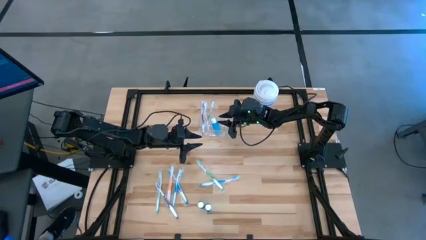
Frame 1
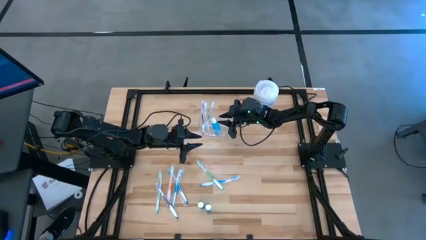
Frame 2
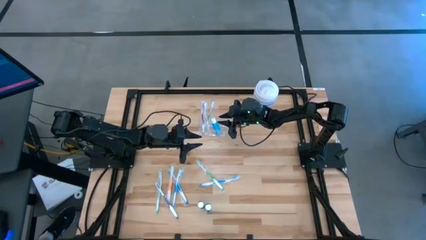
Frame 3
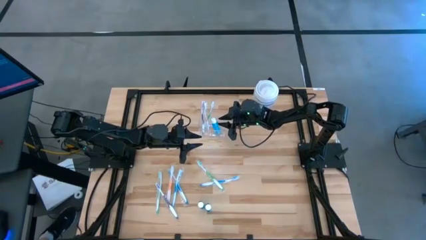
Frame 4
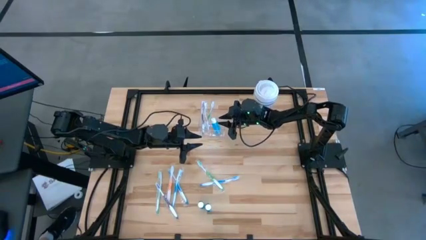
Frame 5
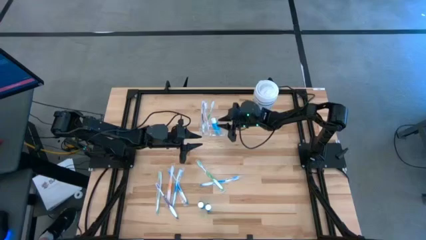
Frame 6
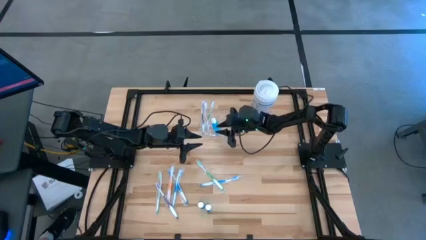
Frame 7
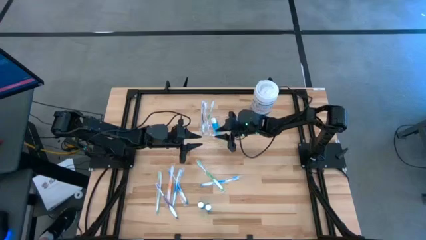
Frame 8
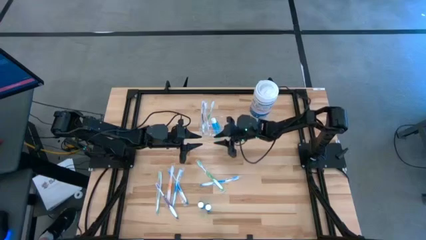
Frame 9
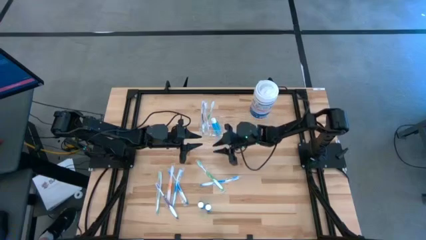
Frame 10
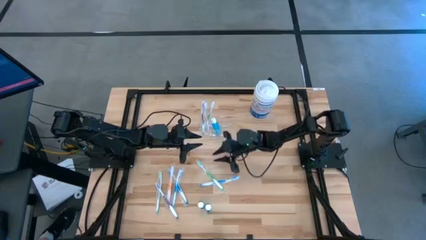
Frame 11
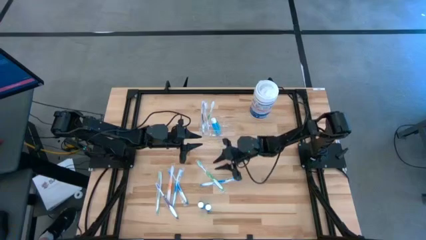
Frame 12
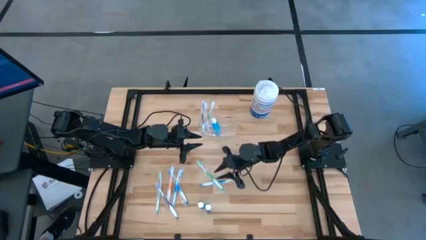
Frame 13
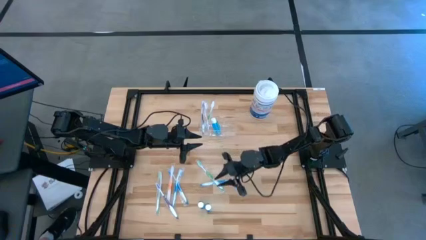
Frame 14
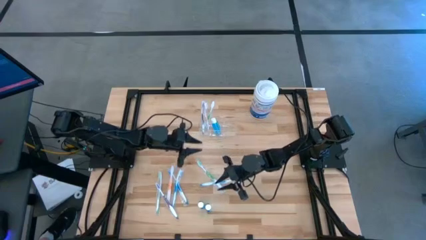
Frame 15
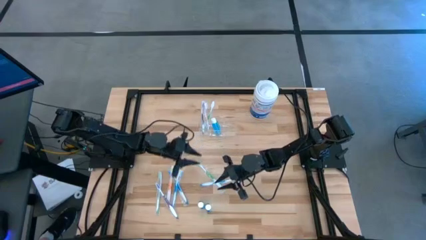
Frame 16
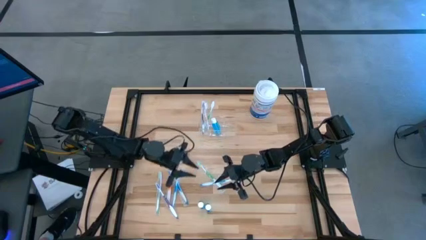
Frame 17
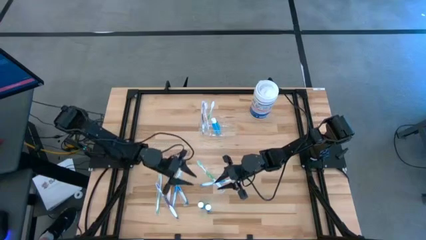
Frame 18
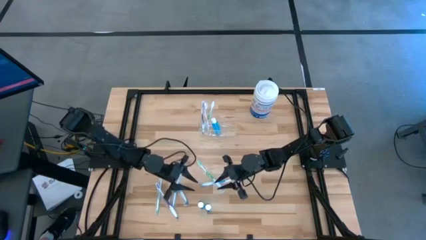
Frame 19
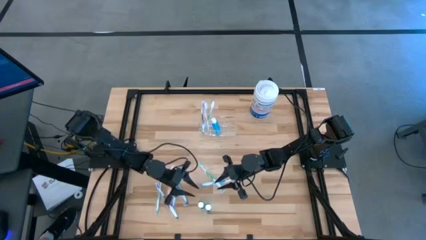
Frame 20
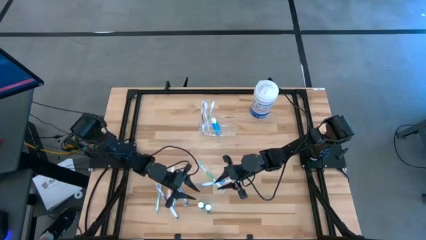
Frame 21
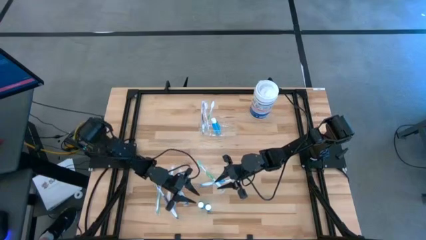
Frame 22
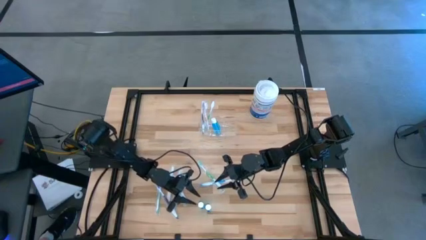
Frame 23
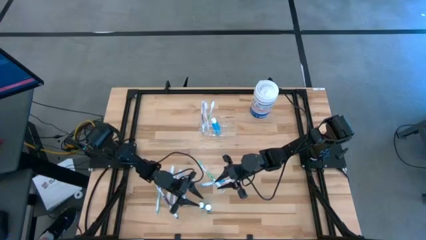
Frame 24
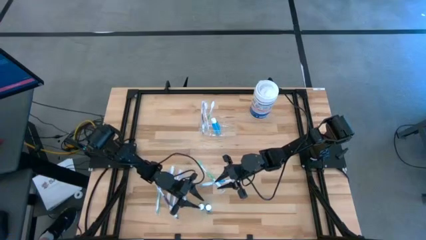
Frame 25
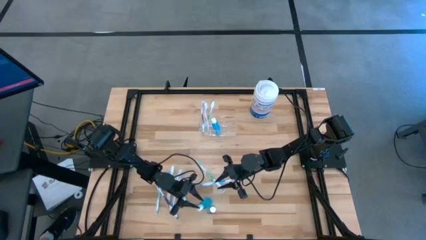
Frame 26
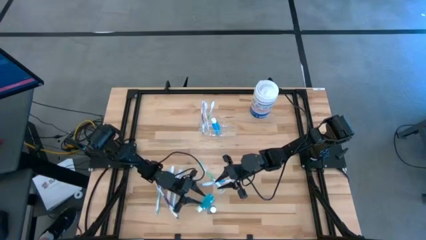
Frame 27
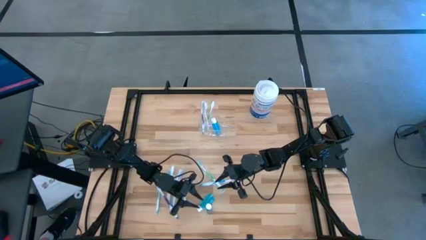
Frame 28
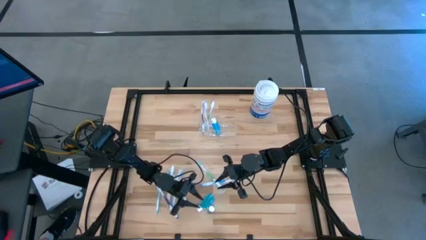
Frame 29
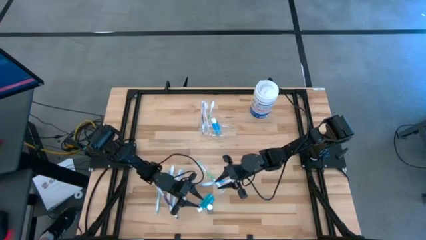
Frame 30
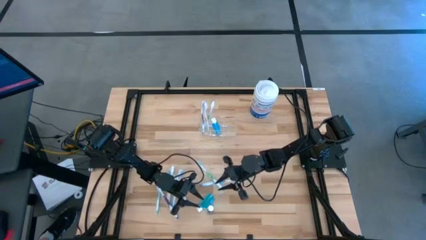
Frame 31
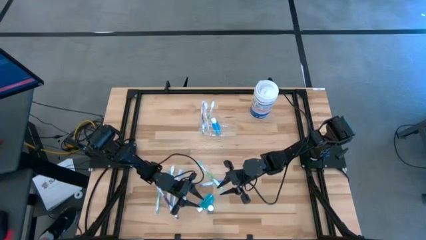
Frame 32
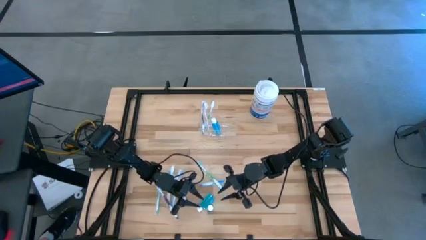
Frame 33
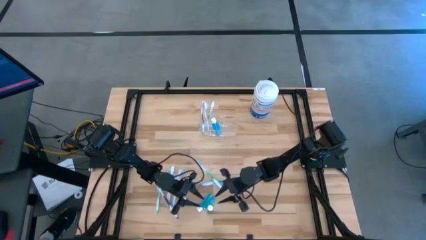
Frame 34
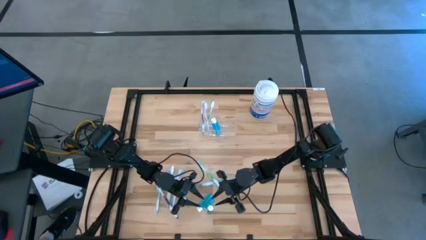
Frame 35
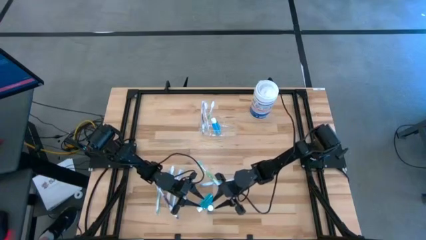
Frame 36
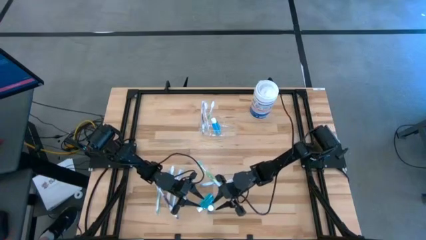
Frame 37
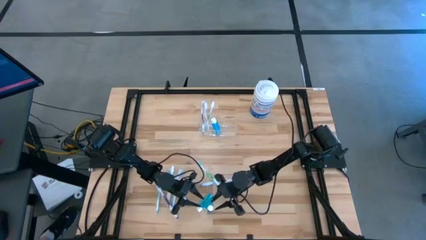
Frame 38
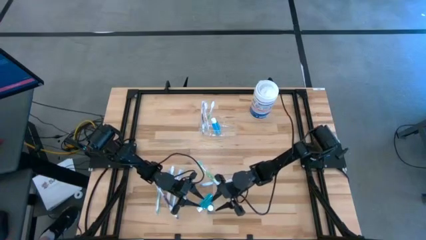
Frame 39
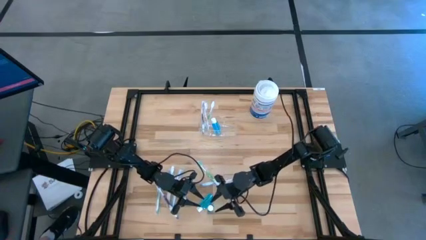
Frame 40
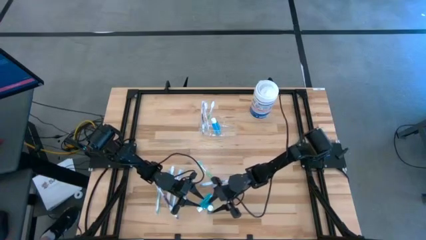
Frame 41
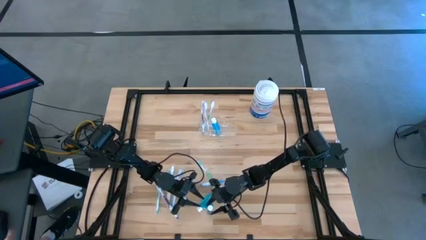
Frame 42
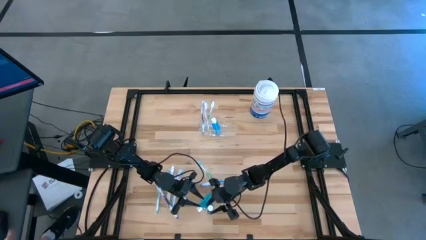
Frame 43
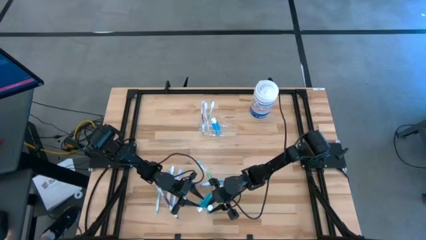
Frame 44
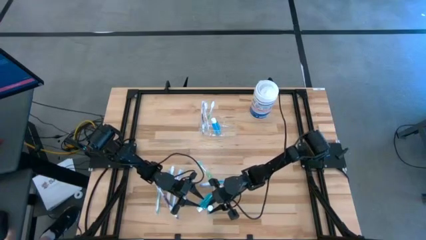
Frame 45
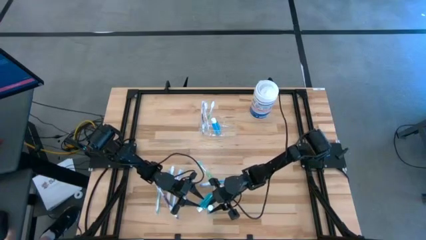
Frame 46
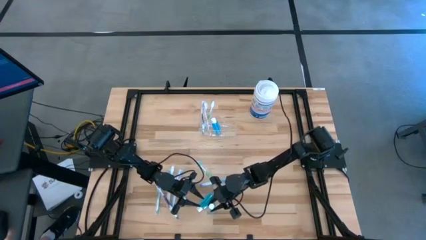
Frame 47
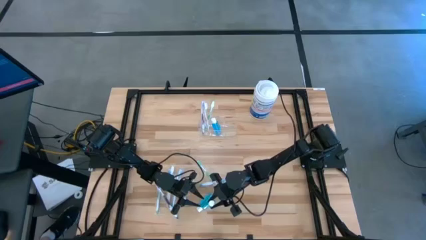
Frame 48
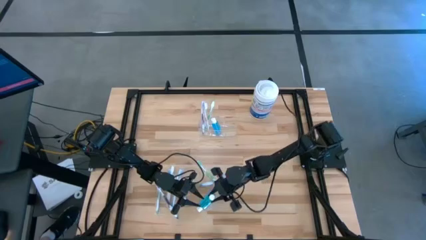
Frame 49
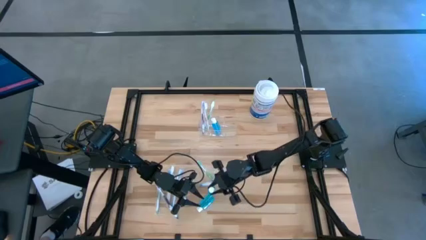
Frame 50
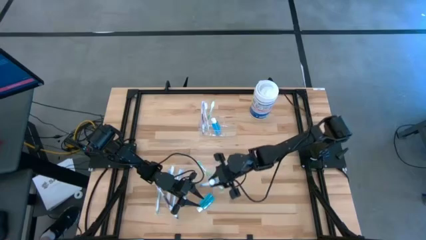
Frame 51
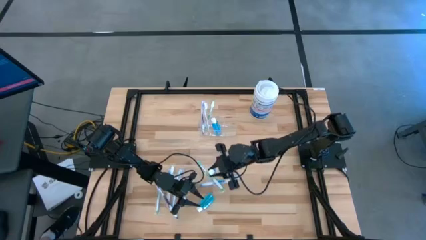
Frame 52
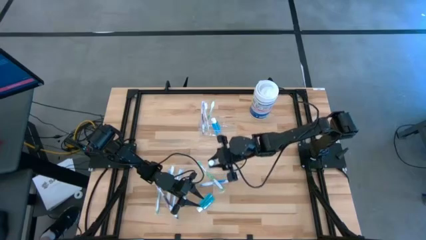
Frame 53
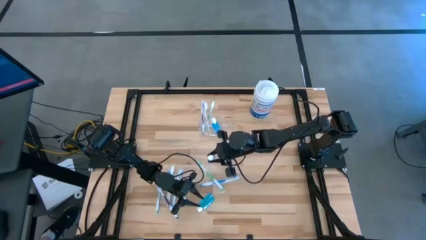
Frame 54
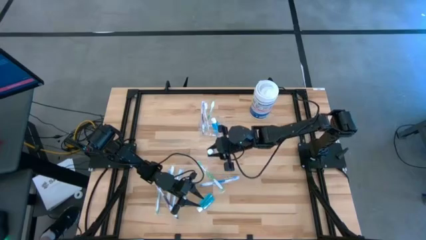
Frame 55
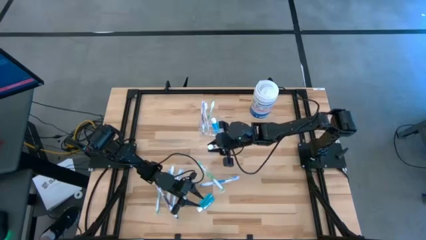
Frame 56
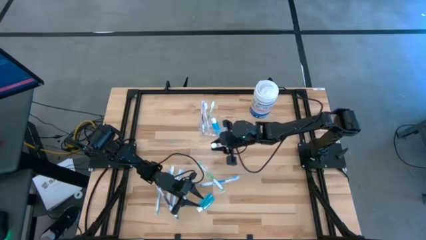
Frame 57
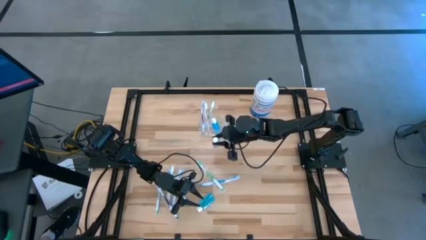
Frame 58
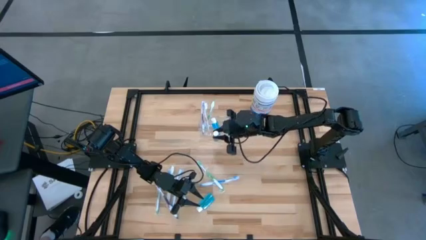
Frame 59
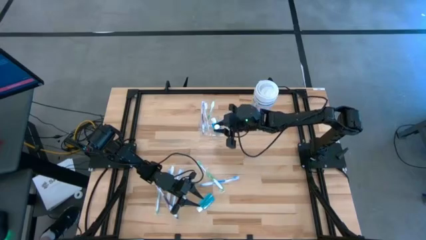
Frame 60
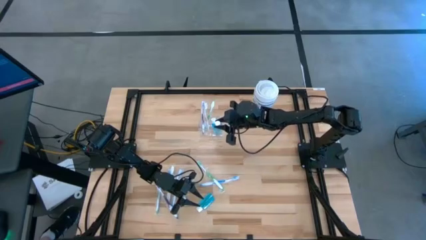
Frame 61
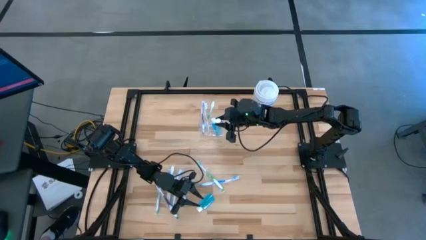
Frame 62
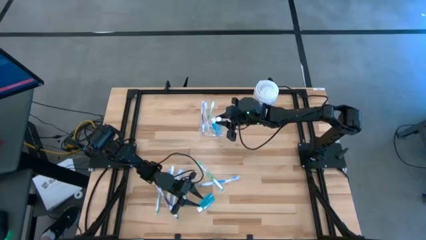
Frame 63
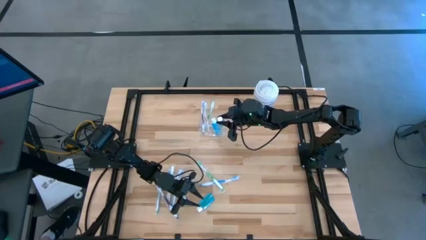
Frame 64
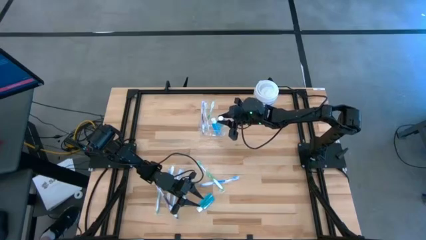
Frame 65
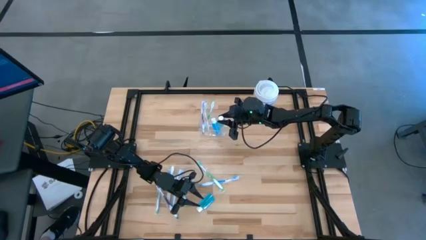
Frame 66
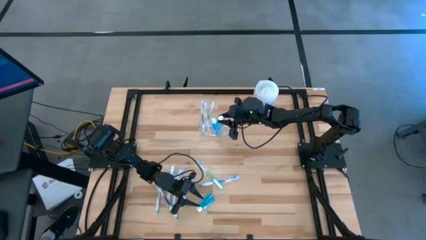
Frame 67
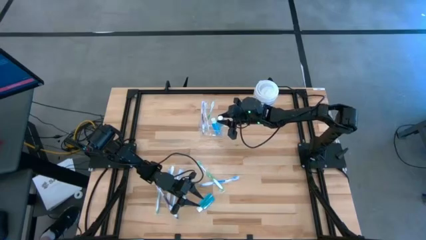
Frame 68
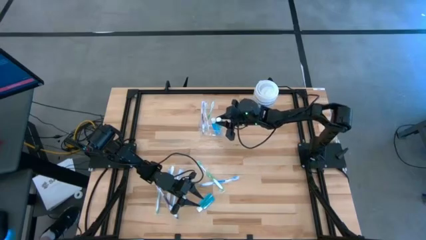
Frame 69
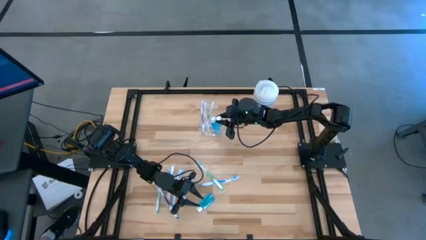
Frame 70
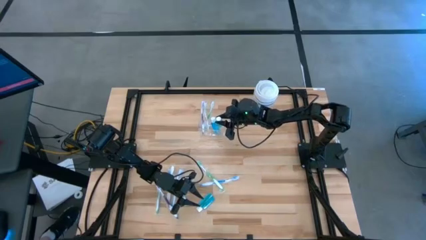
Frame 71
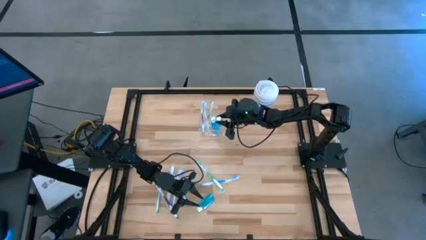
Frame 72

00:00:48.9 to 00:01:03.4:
Task: Pick & Place toothbrushing station
Put the bottom mouthwash into the transparent organizer

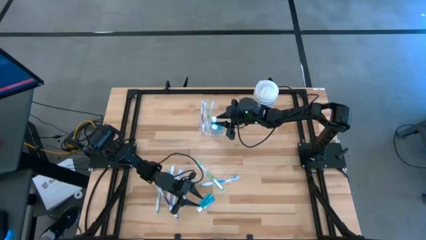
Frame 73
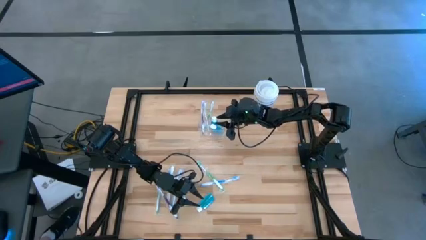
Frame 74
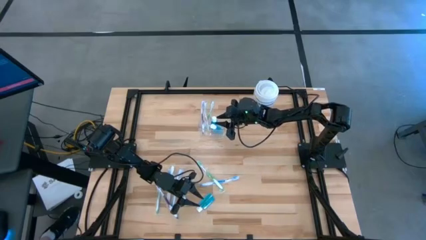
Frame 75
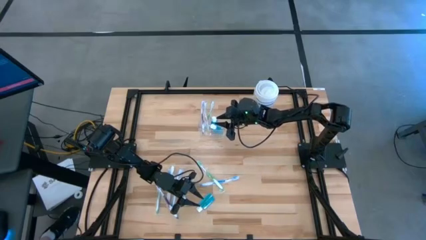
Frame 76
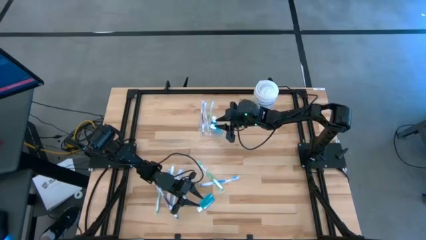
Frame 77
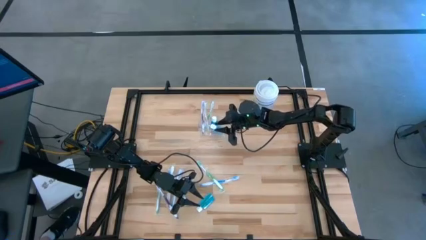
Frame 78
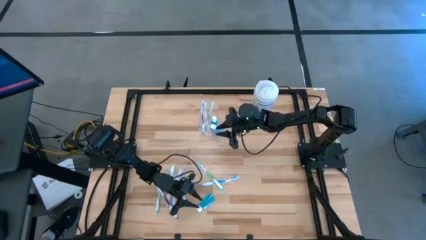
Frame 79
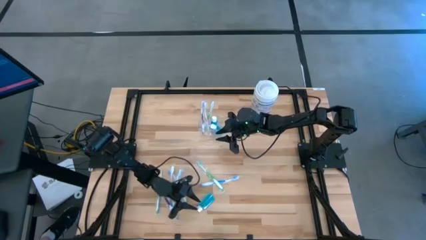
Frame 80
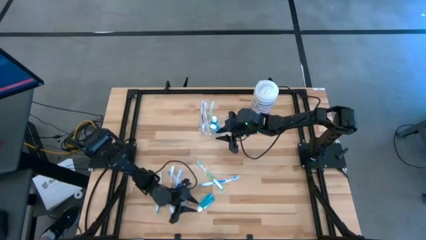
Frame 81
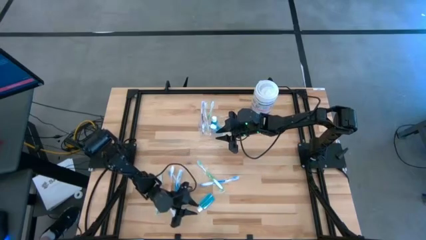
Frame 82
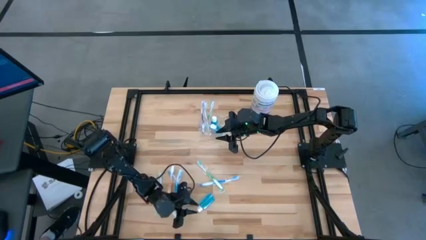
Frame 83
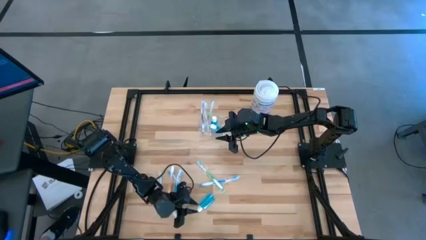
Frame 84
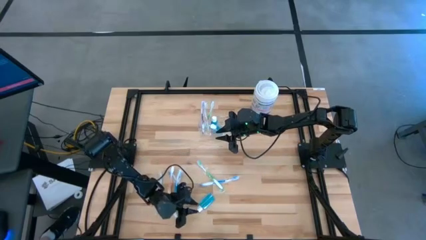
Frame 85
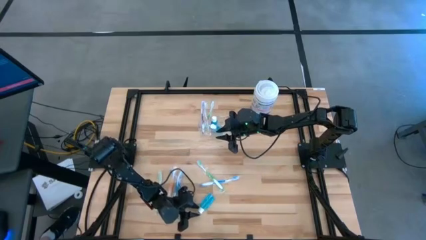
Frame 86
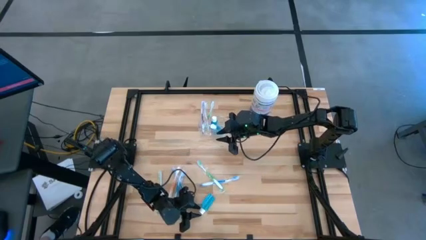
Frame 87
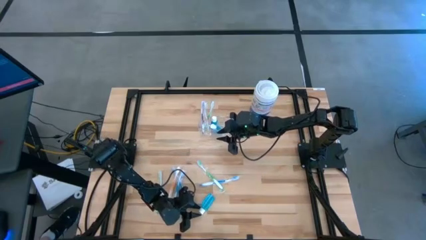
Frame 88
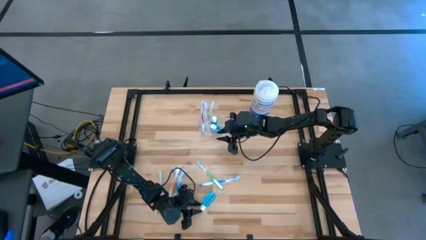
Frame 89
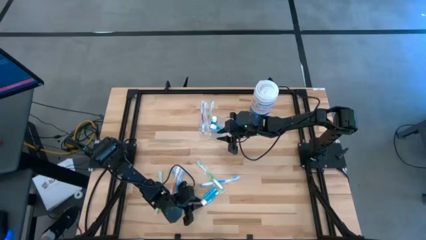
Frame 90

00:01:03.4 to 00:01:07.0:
Put the mouthwash into the transparent organizer
